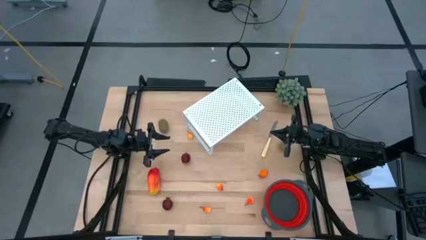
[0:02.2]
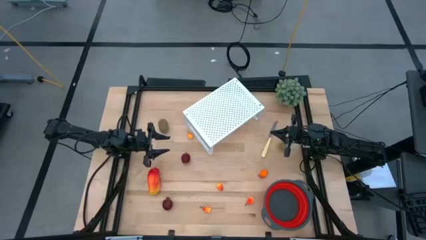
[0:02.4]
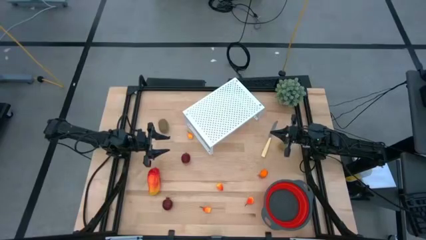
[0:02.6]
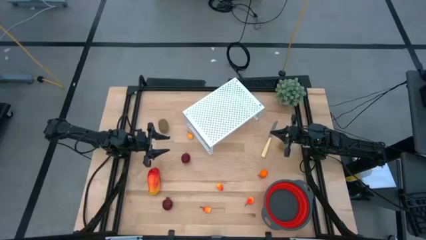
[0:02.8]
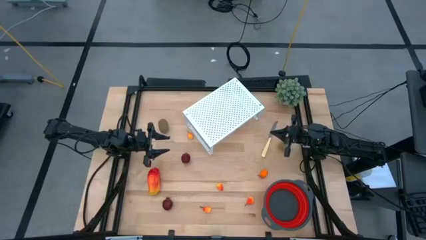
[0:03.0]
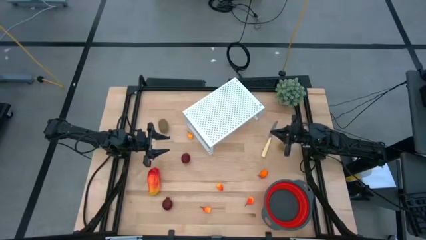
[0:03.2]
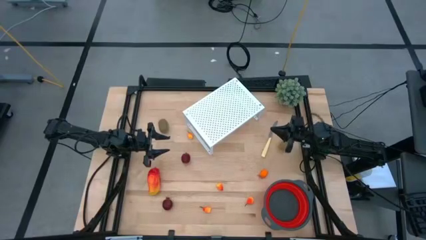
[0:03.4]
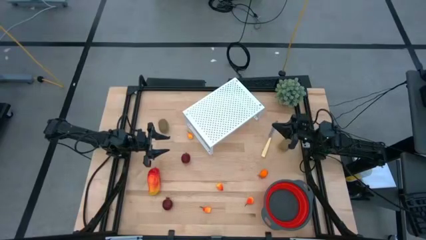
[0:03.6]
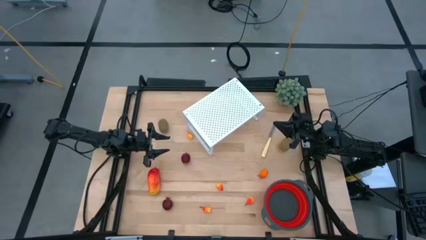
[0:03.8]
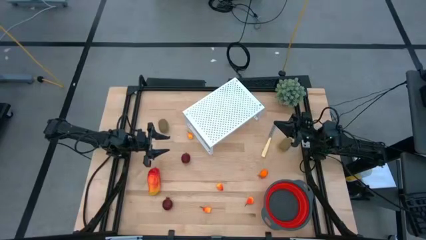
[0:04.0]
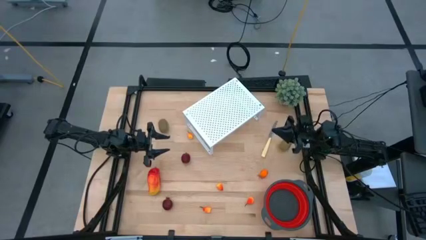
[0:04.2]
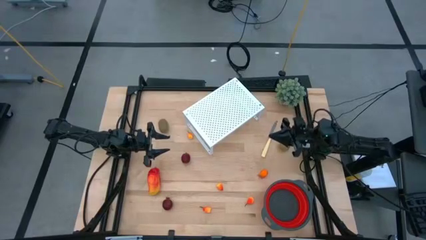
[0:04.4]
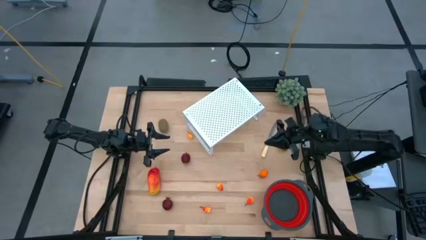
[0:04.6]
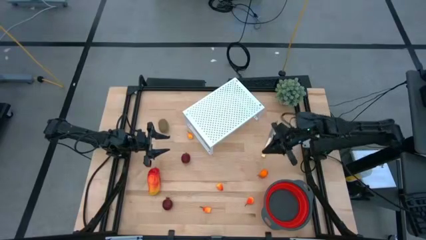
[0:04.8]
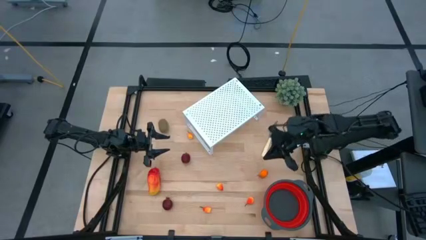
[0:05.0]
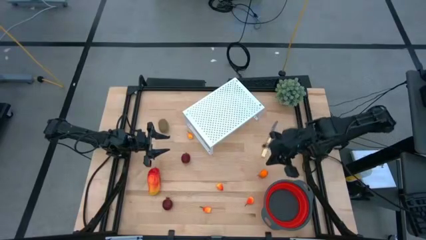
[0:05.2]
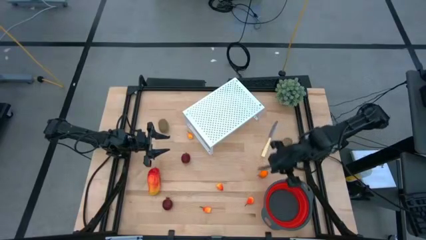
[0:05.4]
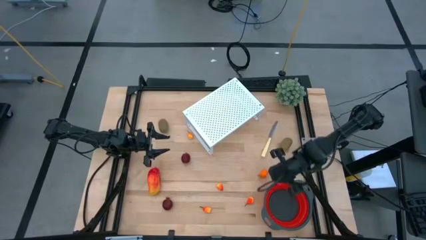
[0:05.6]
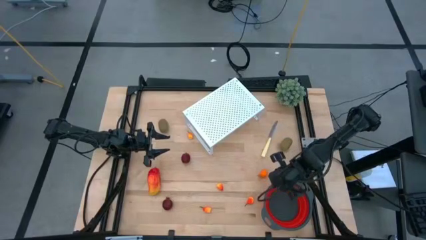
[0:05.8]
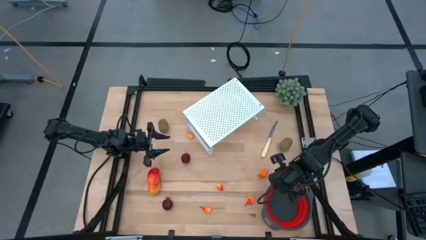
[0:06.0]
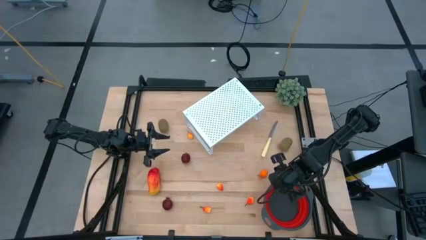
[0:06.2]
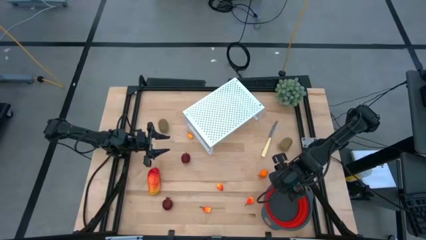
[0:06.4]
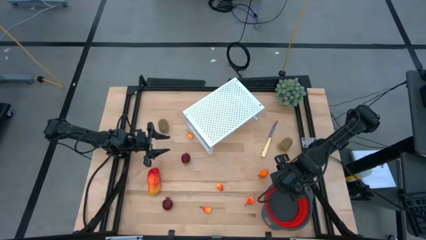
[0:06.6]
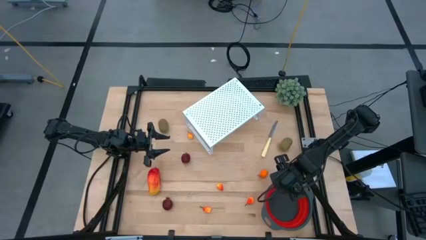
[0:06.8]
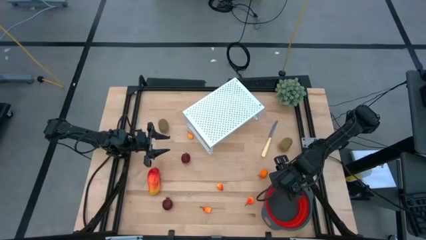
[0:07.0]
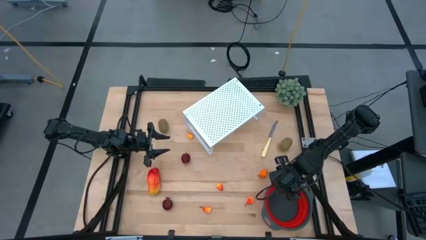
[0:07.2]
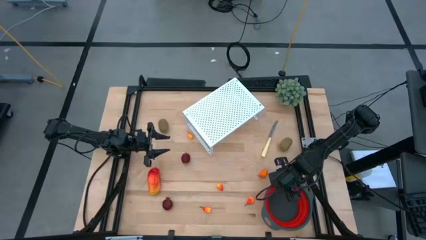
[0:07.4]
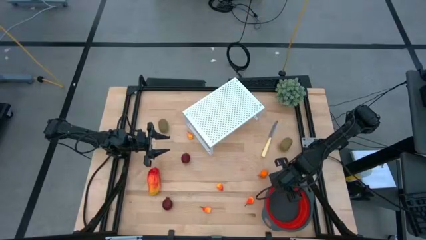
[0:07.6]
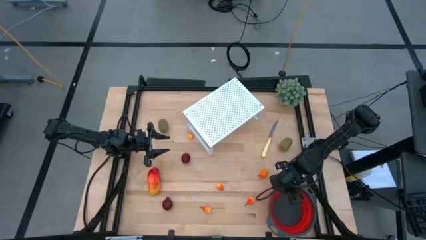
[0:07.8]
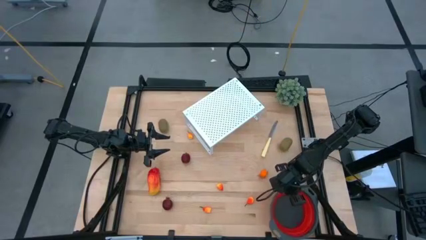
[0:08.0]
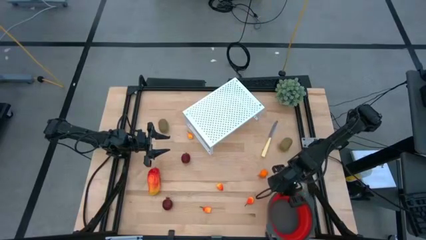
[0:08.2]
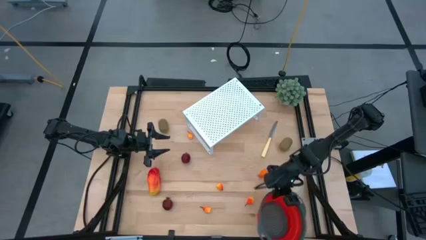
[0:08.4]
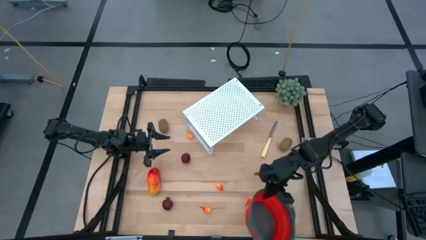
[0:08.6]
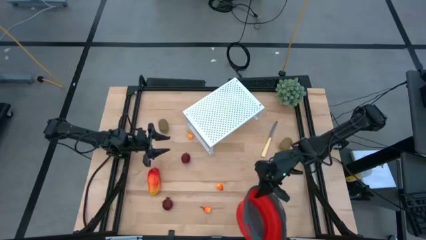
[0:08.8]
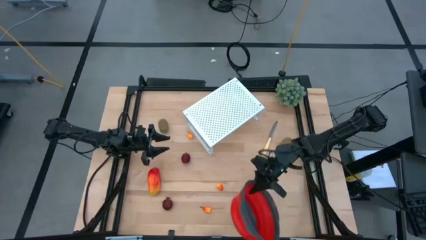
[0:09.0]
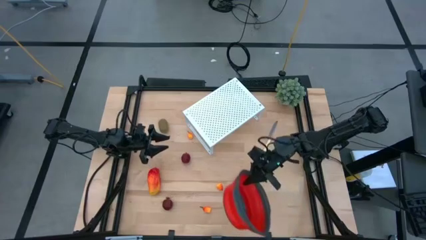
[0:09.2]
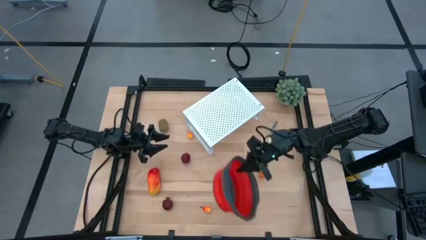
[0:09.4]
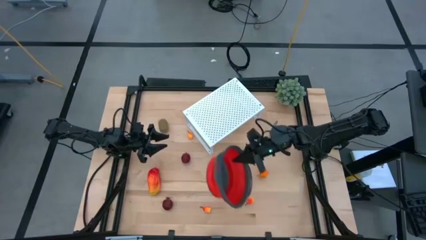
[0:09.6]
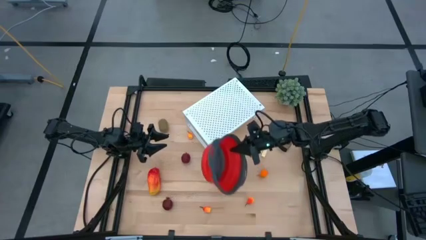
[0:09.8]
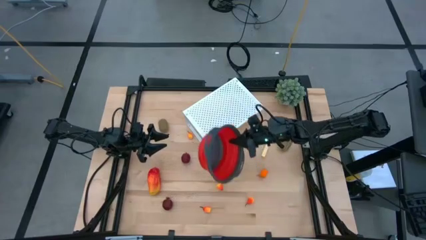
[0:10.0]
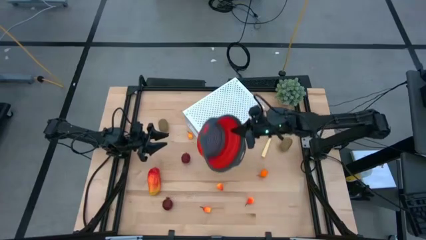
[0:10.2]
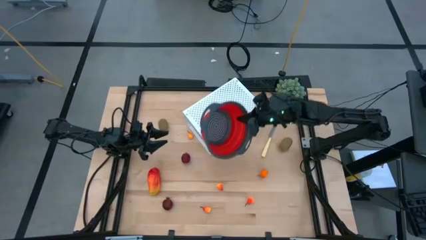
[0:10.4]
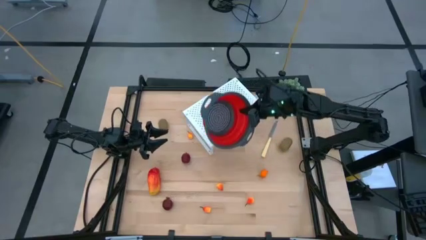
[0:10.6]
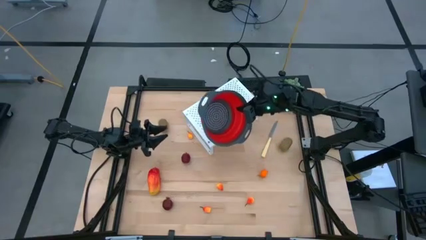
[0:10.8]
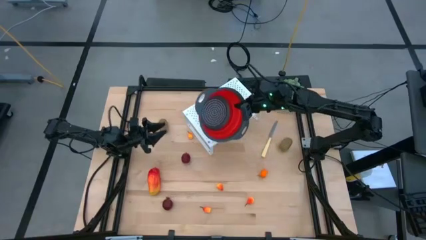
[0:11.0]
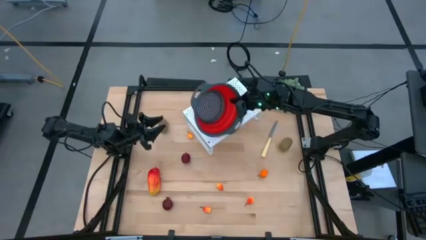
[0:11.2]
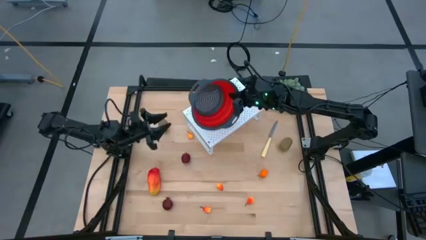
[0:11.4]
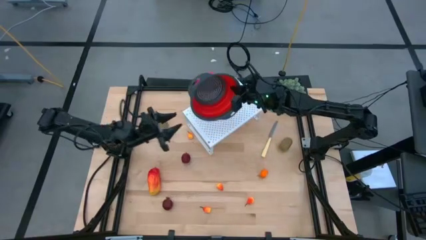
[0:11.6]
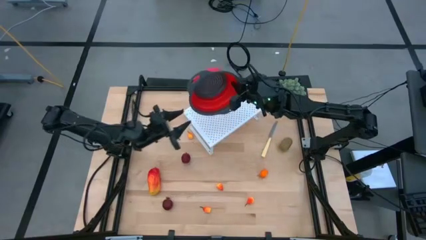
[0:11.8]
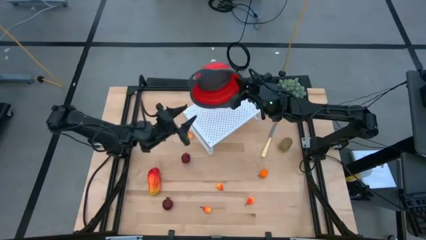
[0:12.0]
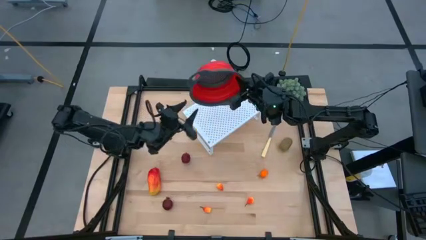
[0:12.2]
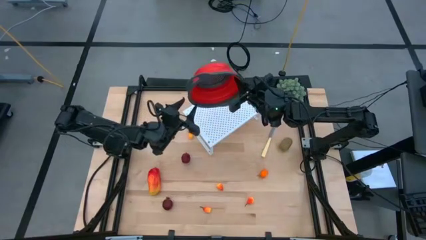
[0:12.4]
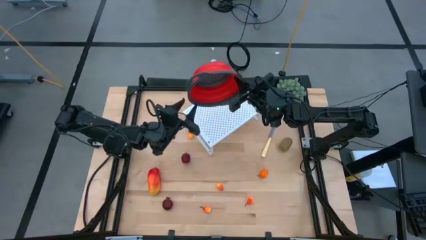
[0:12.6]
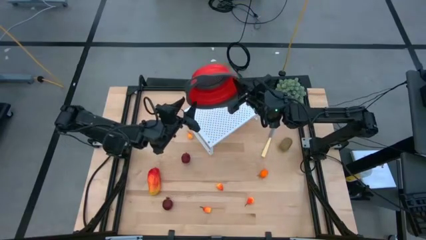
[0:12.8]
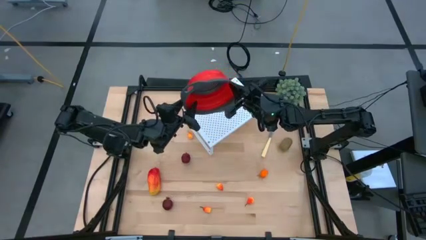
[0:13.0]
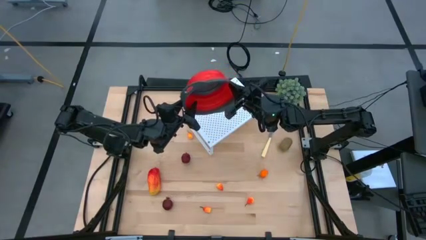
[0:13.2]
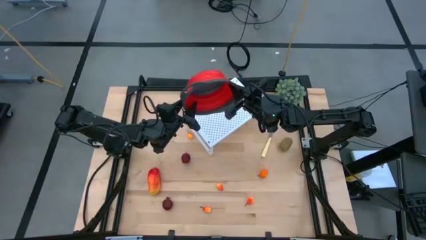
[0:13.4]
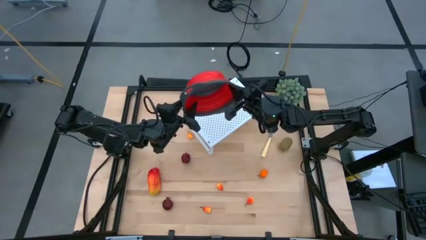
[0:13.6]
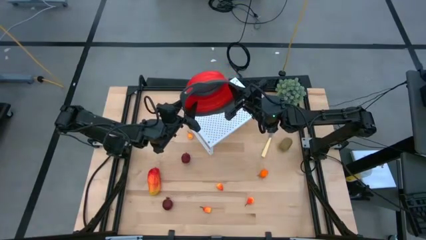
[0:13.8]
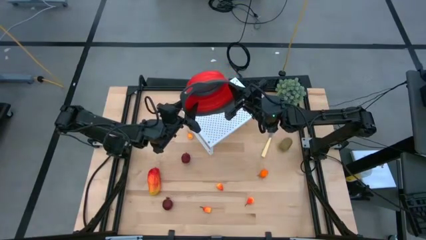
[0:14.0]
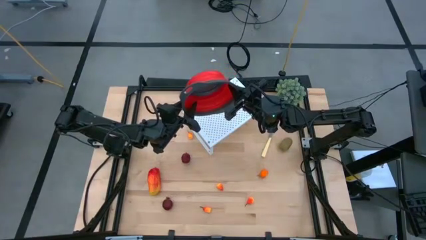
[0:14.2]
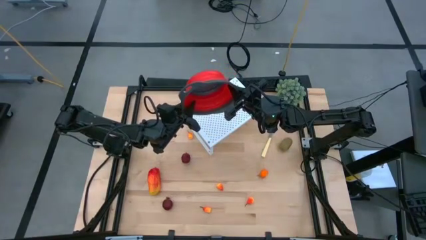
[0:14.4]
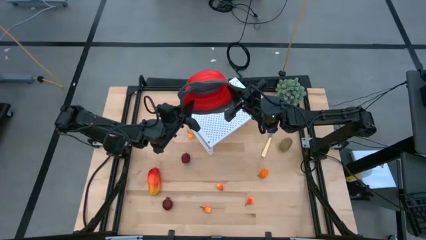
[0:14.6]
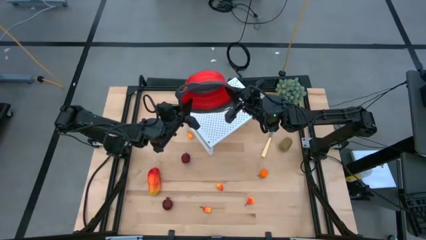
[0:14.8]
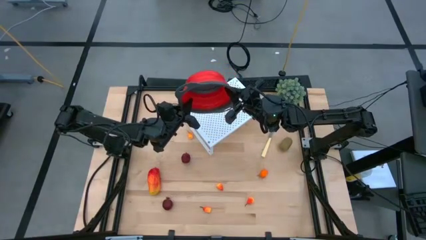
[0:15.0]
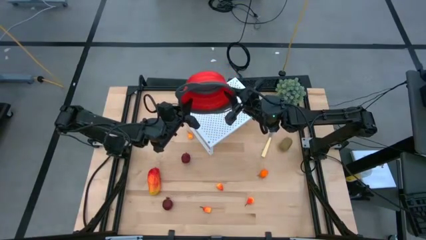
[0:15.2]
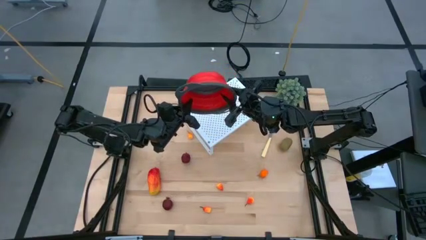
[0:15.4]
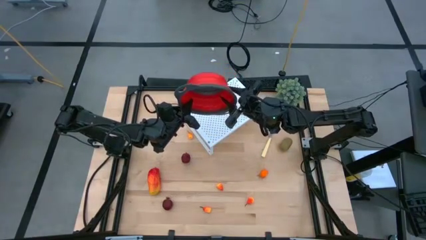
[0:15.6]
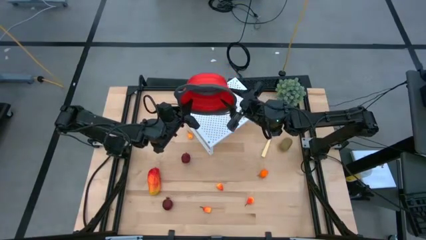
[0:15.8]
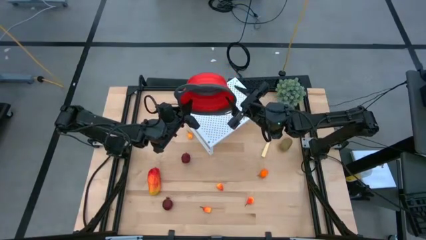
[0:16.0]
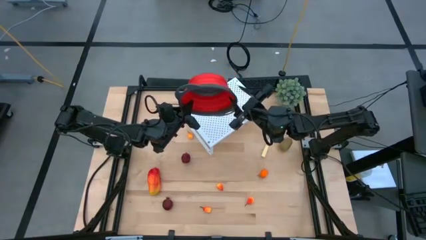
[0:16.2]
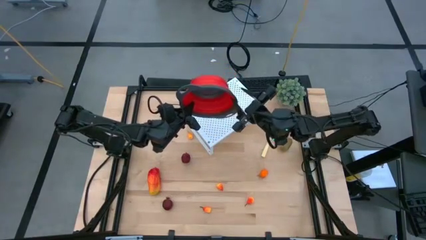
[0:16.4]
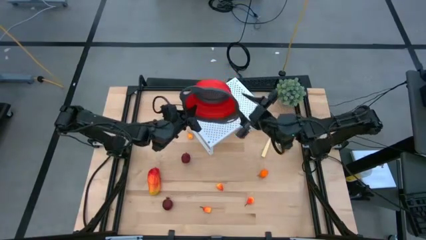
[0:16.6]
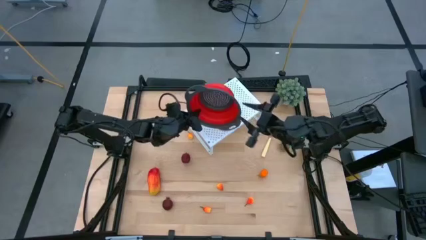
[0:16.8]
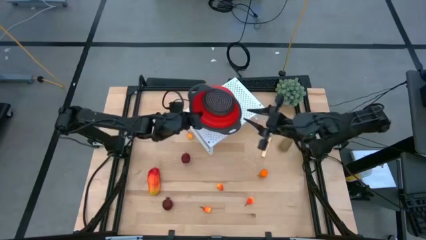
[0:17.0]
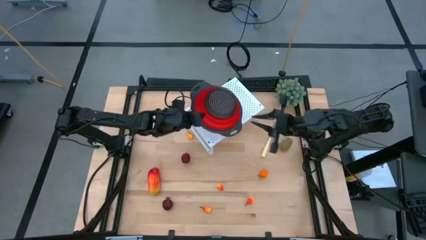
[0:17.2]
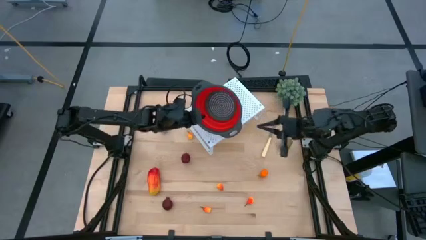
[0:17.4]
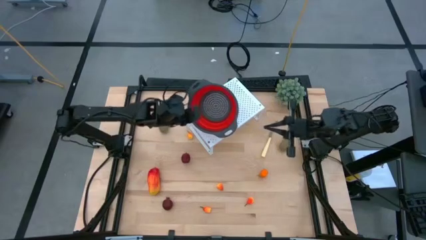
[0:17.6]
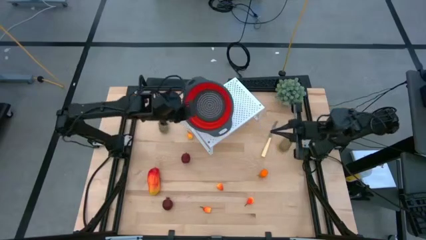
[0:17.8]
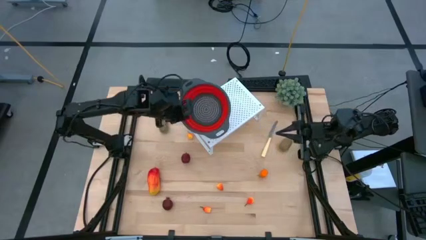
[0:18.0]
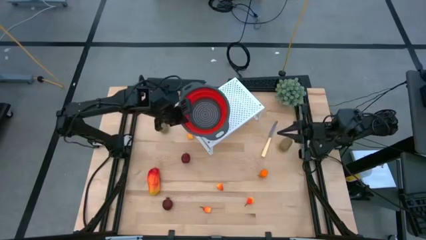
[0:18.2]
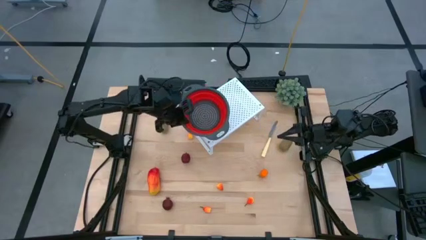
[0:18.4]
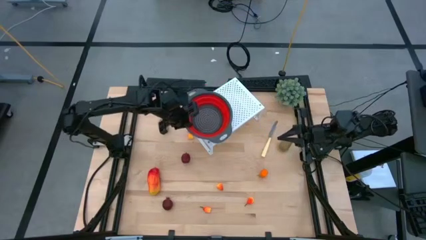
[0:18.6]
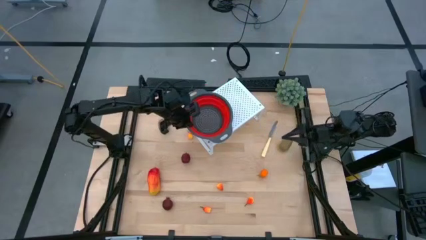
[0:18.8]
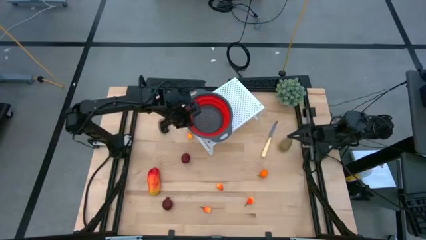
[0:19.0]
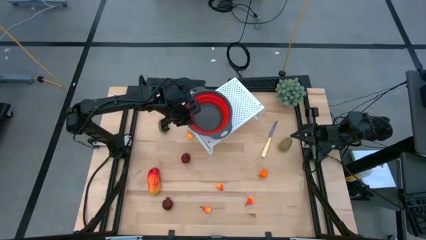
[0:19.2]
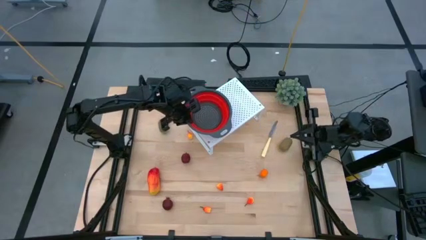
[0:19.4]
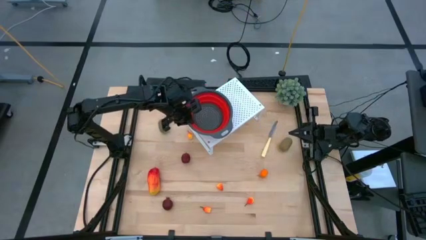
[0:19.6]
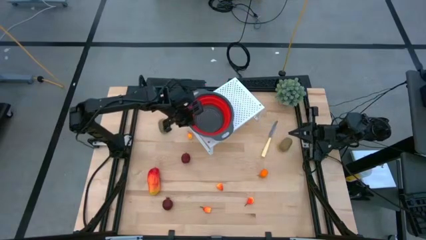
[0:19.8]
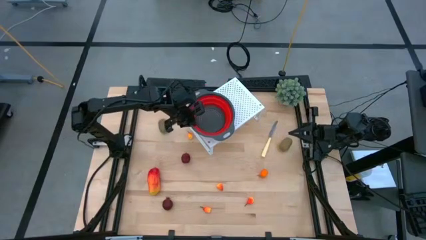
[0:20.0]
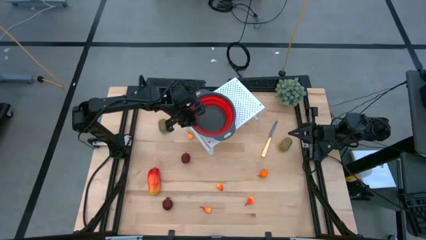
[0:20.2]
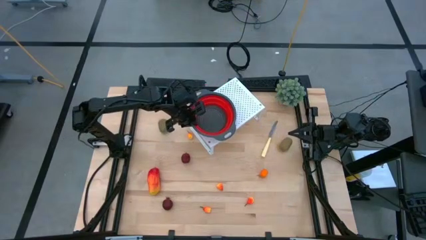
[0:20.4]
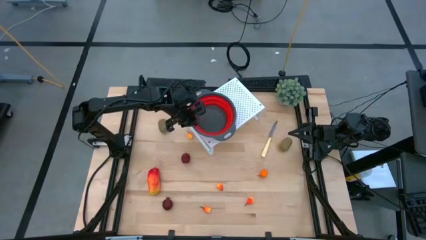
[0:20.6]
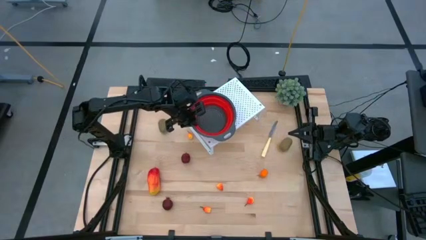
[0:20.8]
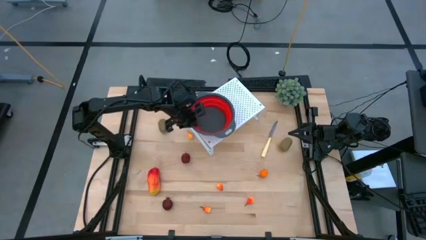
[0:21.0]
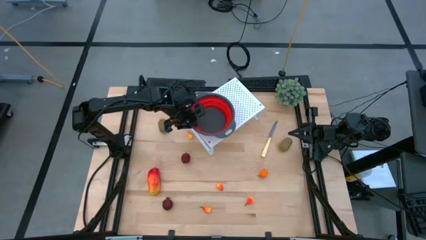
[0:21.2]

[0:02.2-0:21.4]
Task: Pick & Place Fruit
Put the red strainer bowl on the shelf
